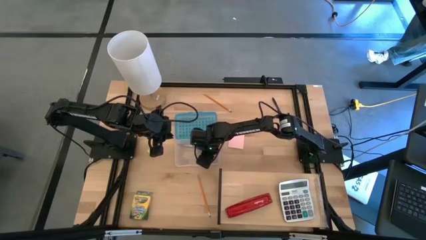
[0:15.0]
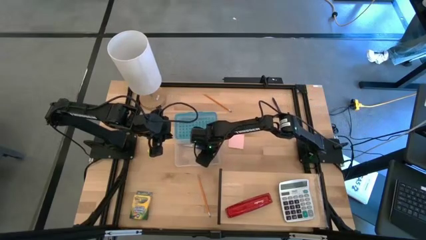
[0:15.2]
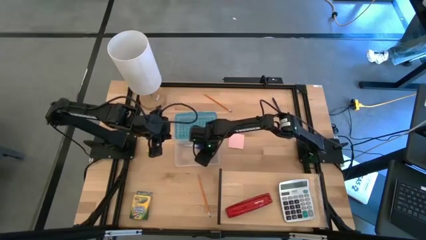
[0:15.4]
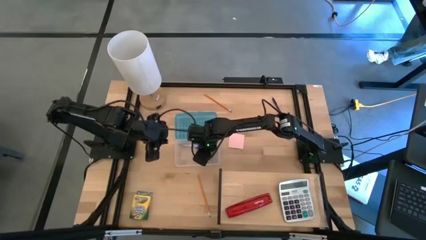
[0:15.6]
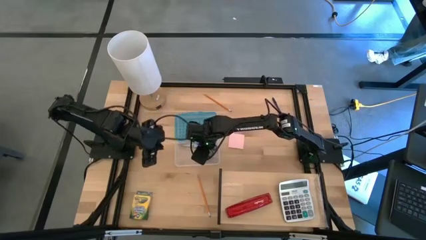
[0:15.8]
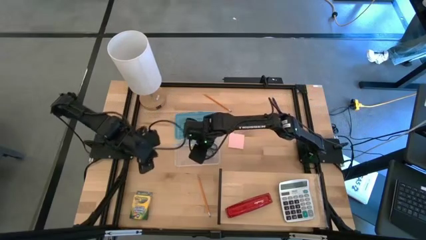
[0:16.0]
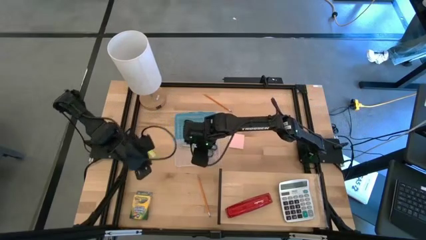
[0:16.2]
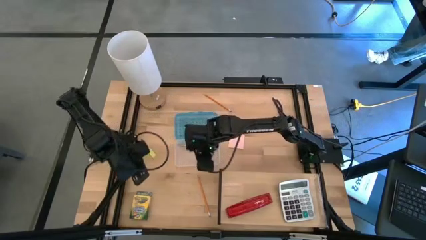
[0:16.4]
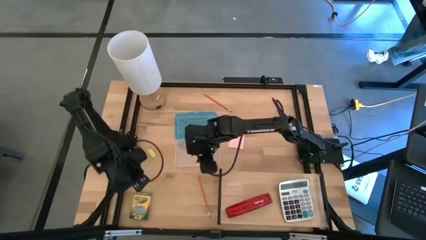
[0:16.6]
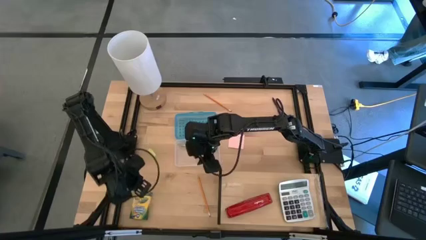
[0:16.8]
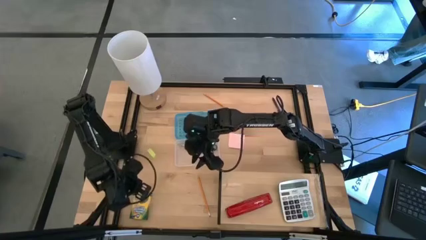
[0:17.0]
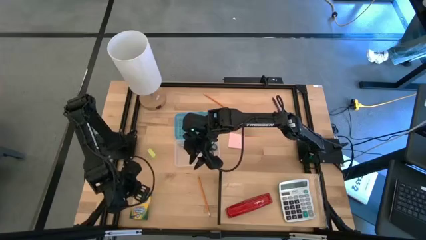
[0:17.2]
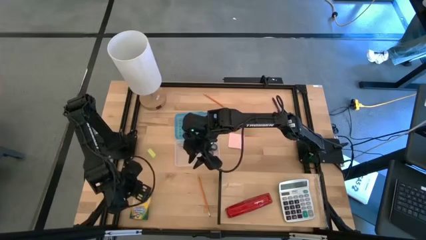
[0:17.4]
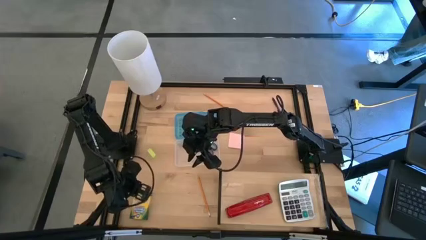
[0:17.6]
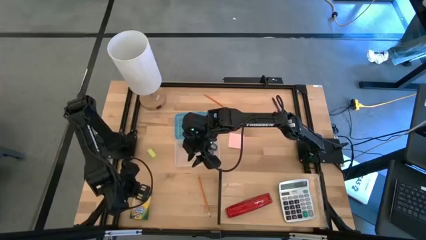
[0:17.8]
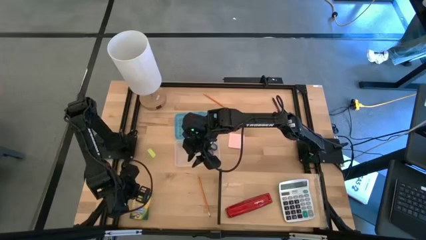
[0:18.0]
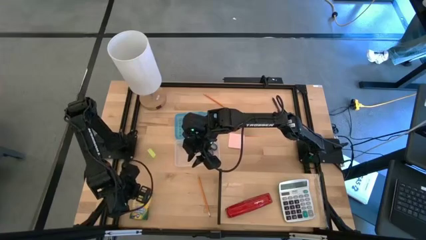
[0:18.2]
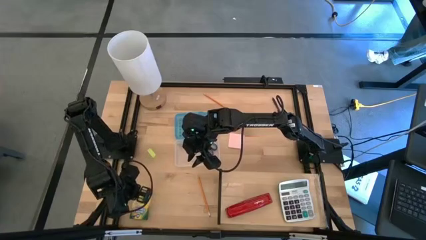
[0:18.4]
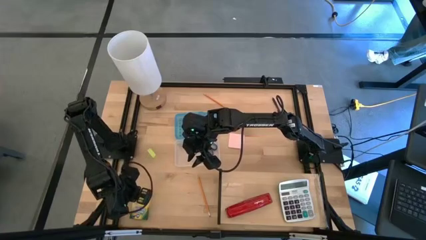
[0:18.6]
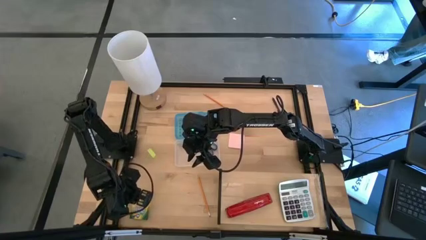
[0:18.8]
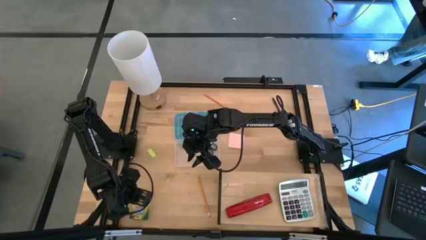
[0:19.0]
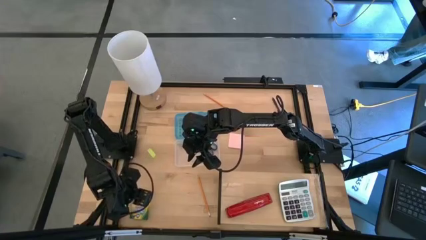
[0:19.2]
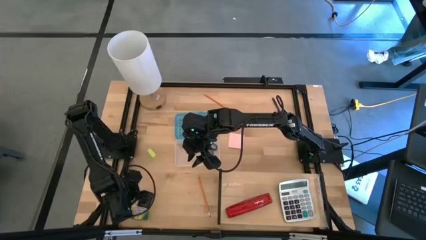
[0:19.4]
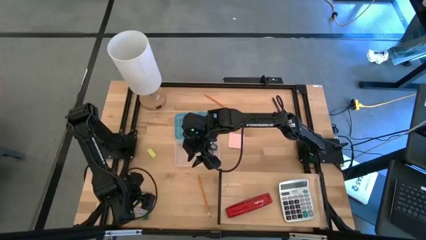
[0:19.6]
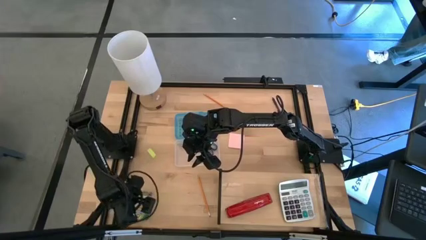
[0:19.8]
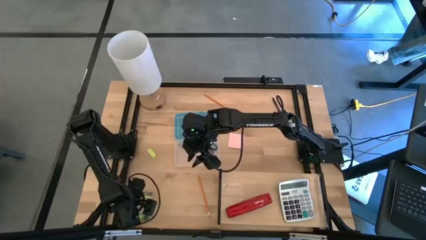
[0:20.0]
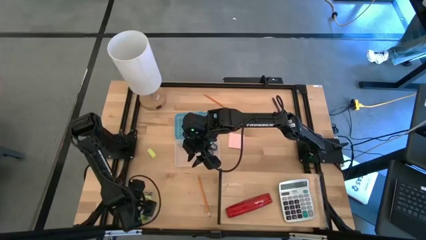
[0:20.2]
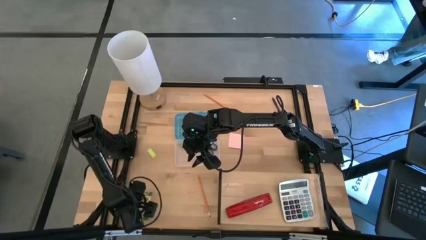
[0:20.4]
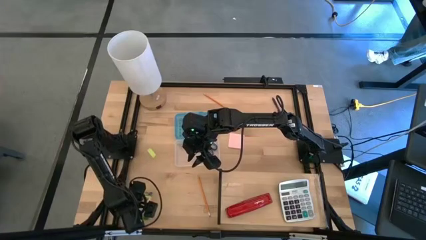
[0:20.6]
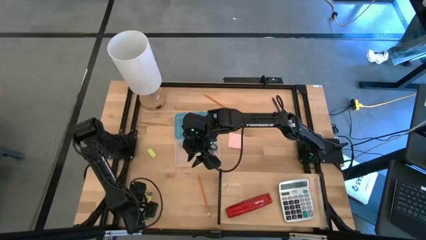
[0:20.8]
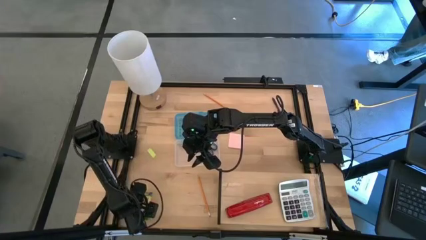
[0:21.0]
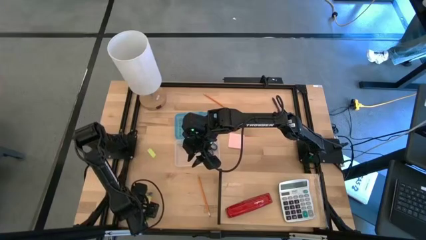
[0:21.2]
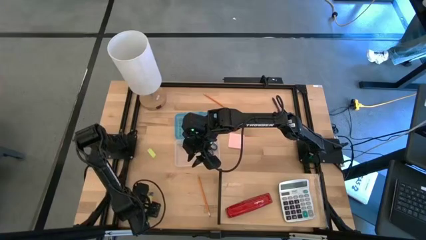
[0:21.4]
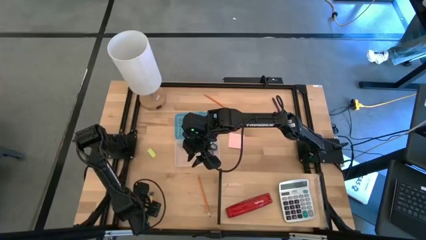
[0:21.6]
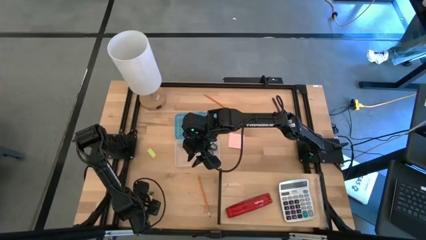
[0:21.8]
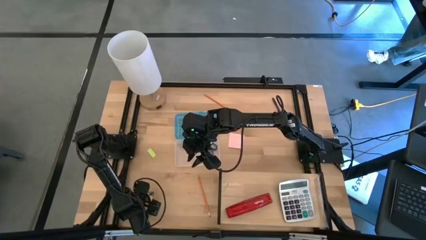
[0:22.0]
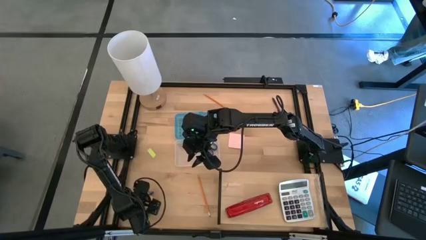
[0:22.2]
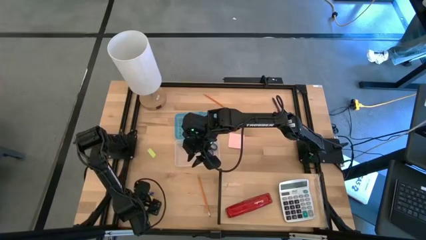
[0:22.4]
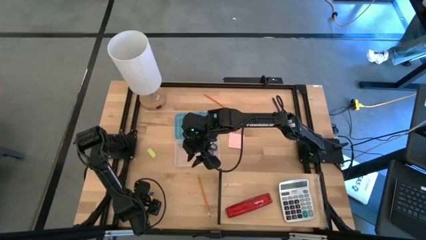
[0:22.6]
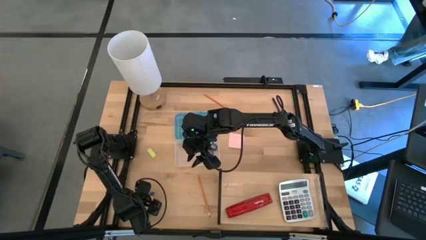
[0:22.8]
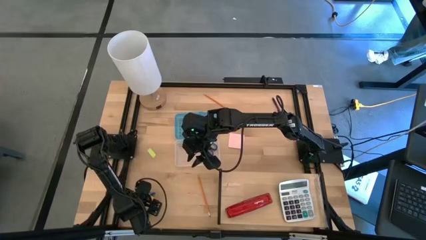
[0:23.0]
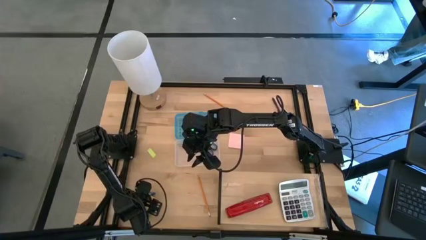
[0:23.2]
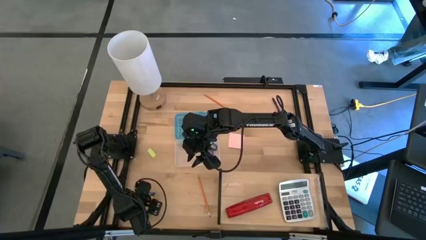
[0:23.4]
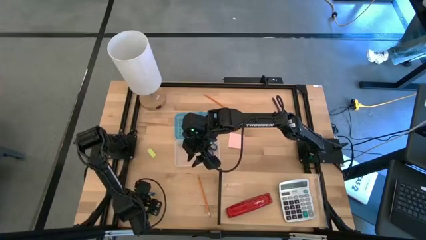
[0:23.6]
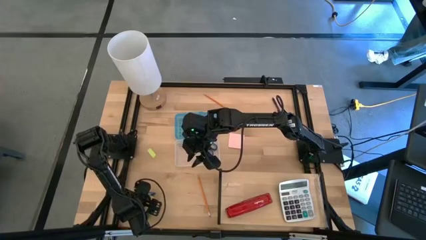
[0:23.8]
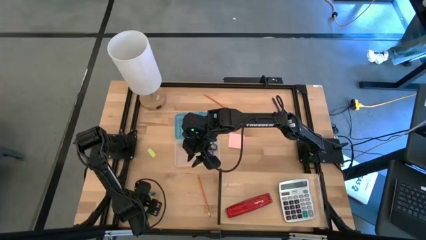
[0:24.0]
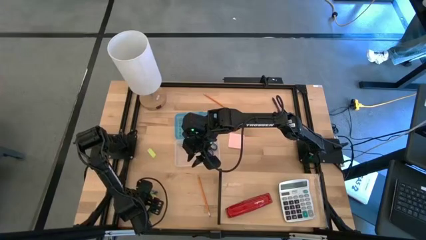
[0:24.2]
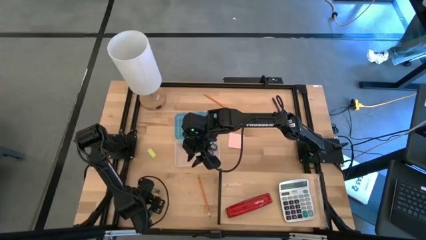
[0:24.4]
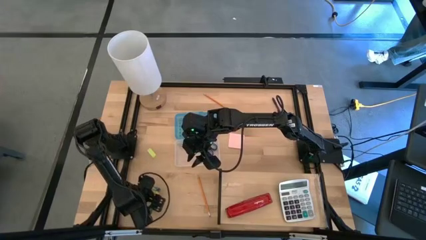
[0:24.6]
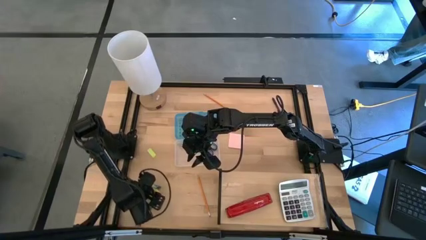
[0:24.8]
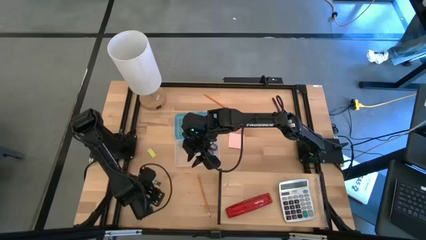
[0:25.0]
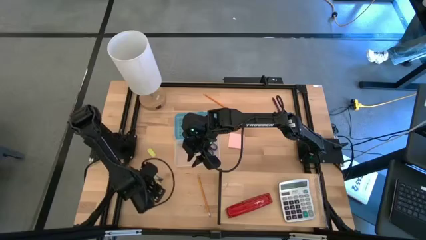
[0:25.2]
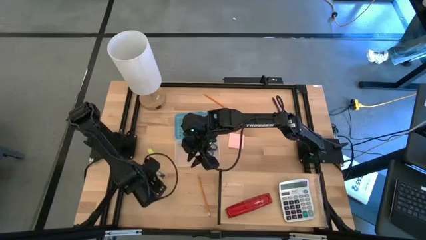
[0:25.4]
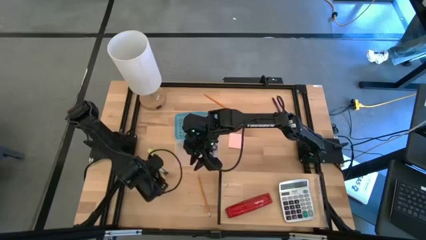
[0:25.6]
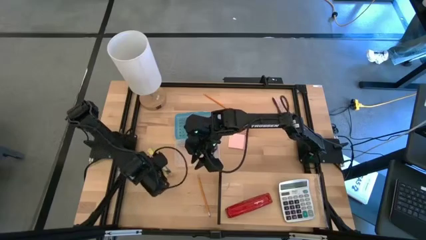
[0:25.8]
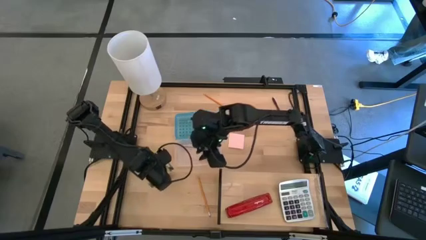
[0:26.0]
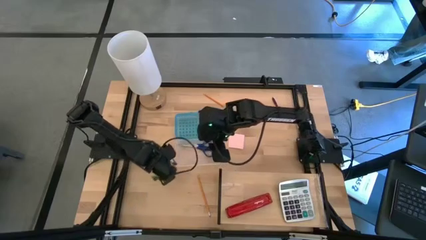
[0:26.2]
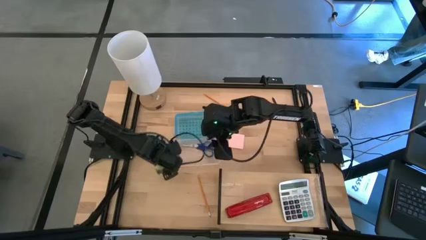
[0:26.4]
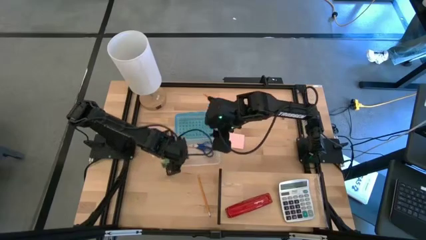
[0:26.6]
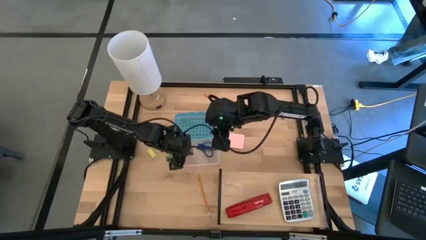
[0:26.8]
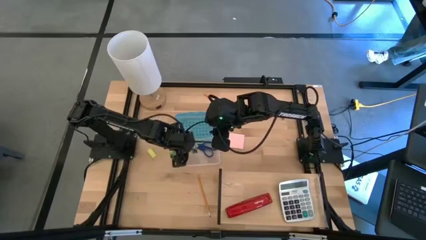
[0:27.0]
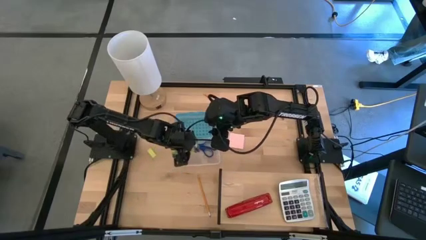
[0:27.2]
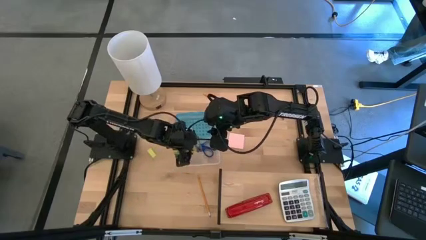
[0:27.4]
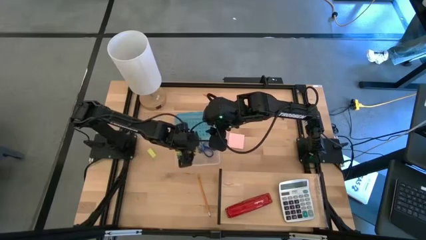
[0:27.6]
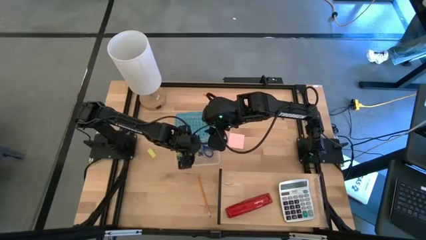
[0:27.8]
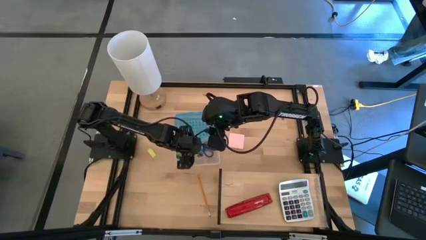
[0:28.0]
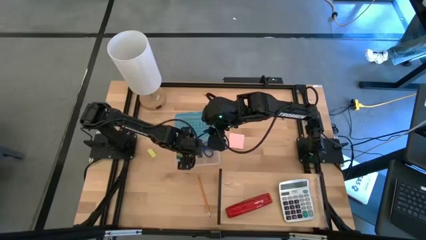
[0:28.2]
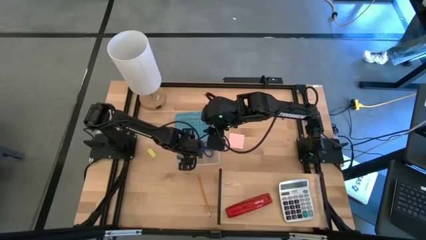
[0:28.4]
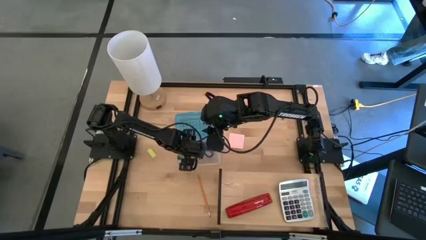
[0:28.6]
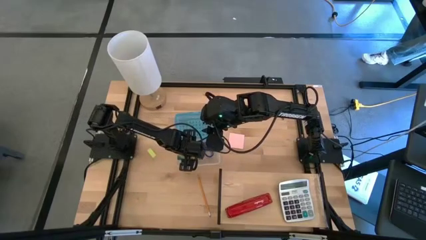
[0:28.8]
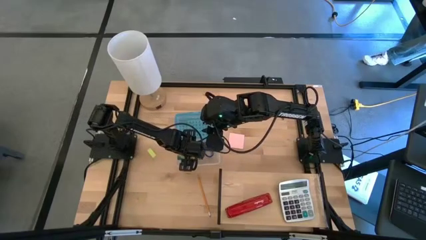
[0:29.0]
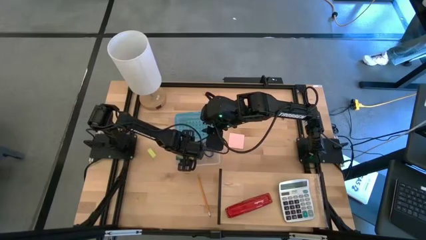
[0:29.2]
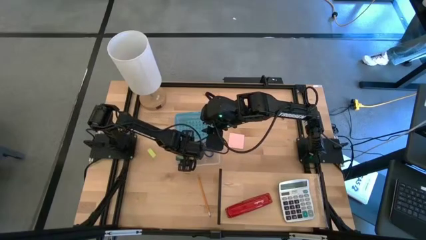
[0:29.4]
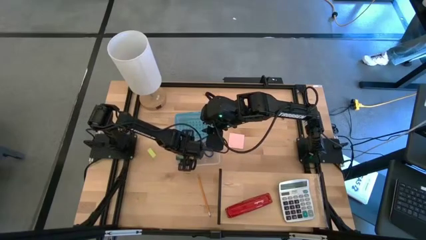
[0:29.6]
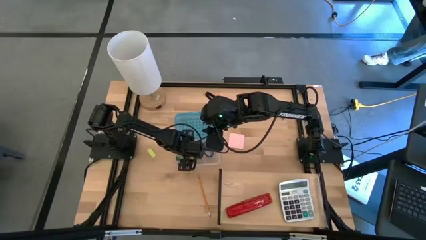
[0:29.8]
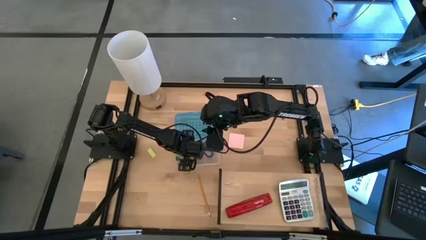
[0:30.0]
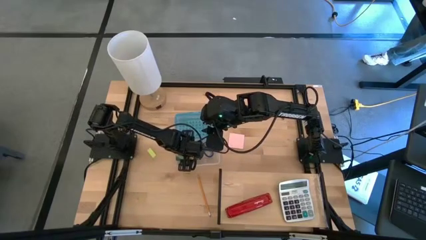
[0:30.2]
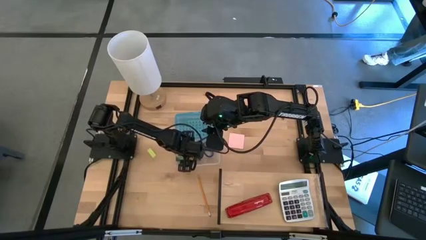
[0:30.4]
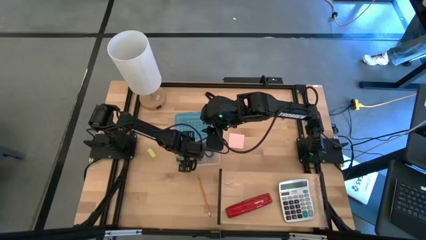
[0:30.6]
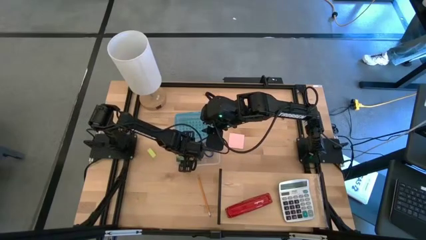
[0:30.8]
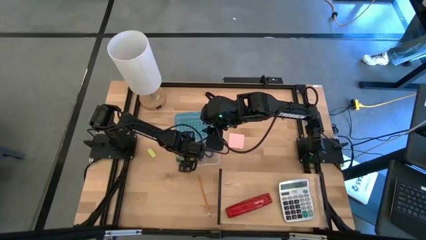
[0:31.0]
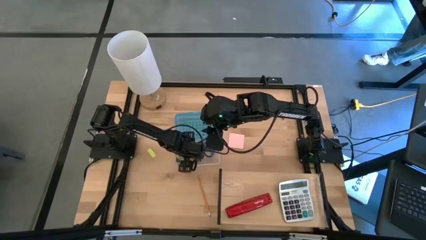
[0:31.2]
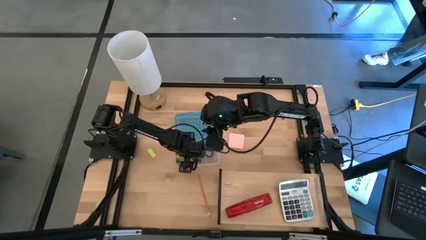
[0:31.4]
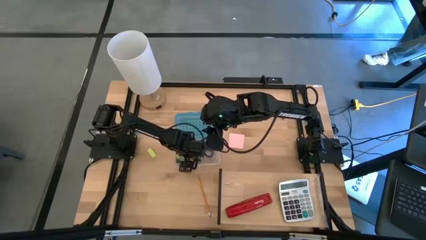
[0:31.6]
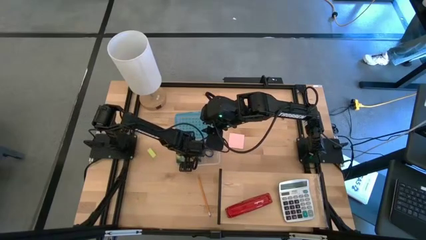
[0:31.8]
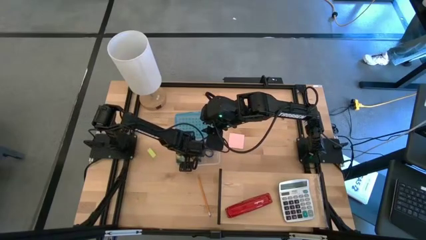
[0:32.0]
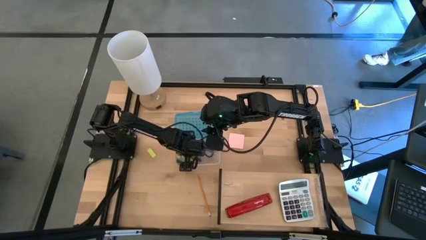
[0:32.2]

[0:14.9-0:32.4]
Task: Pack school essentials
Put the crayon box into the blue supply box
